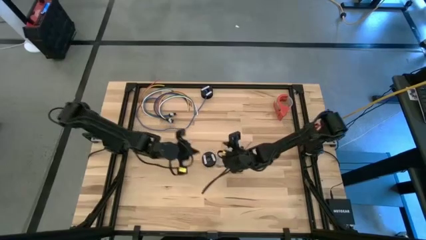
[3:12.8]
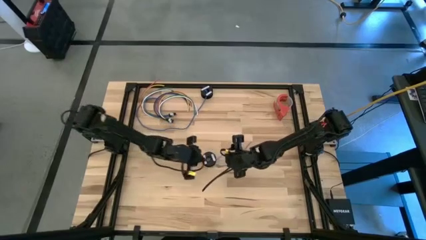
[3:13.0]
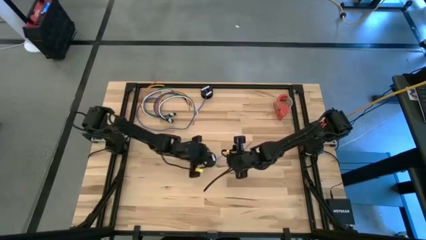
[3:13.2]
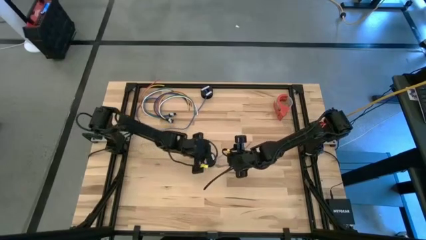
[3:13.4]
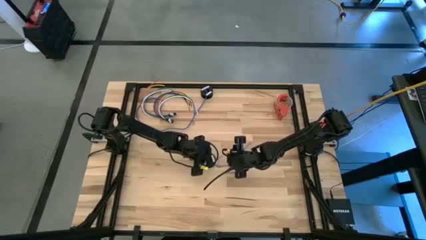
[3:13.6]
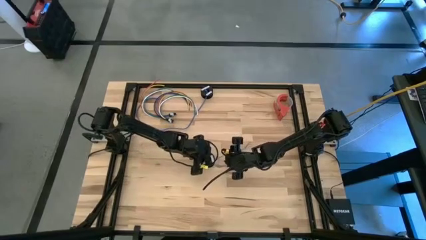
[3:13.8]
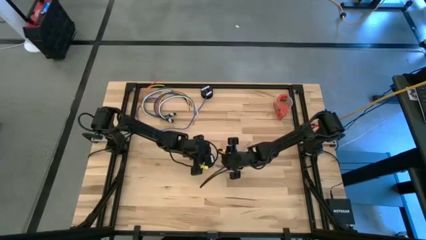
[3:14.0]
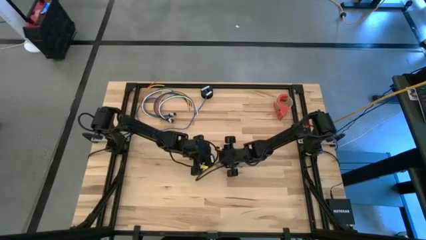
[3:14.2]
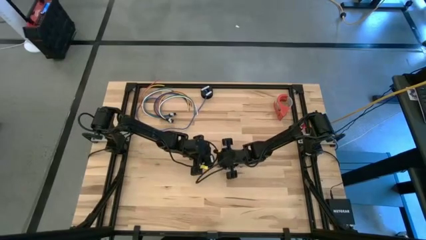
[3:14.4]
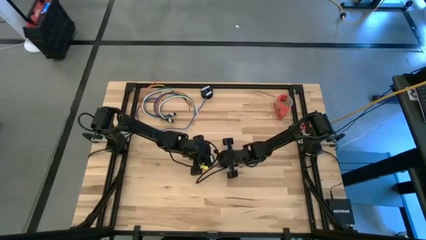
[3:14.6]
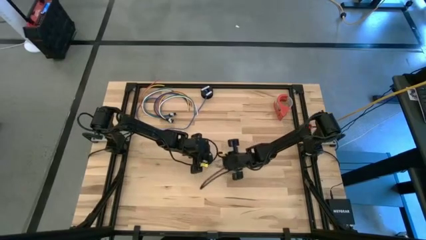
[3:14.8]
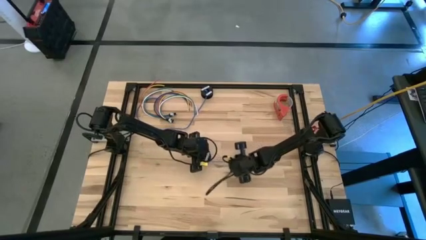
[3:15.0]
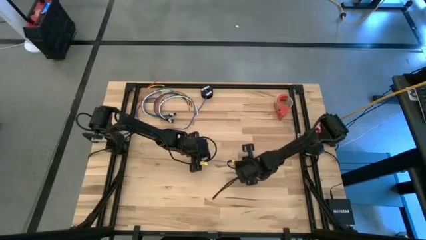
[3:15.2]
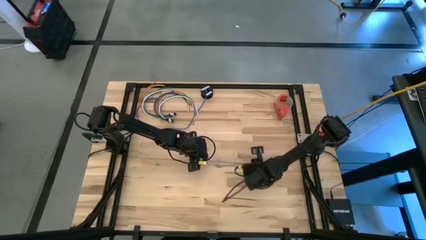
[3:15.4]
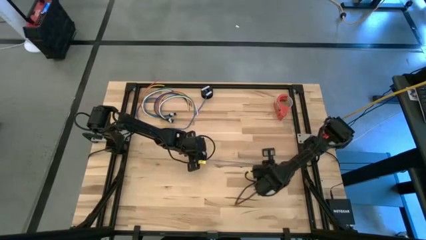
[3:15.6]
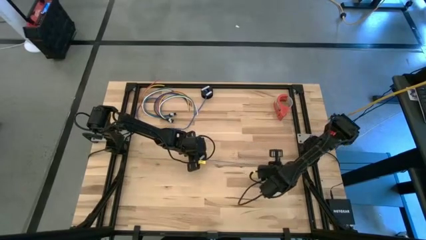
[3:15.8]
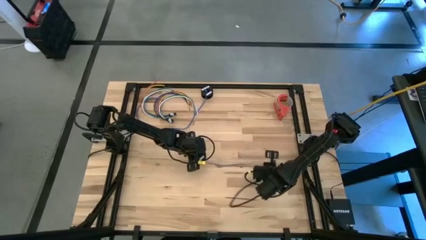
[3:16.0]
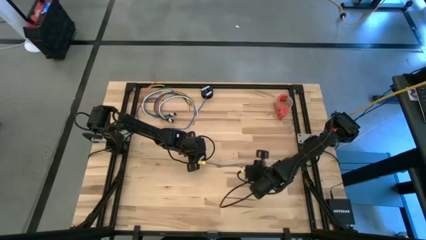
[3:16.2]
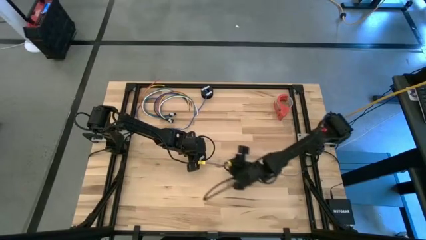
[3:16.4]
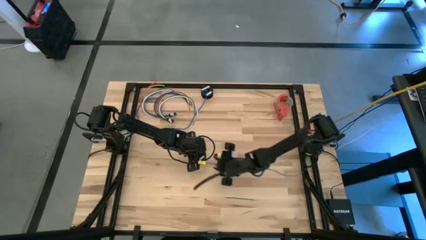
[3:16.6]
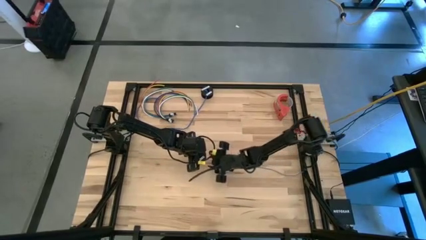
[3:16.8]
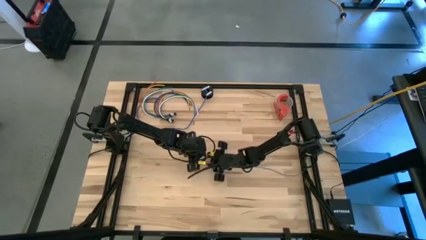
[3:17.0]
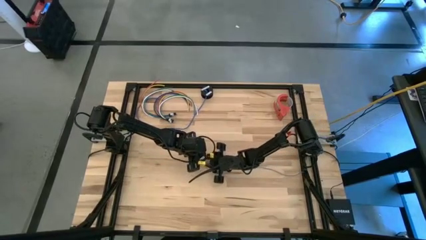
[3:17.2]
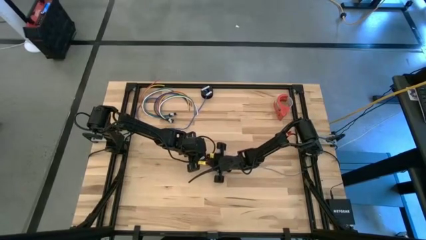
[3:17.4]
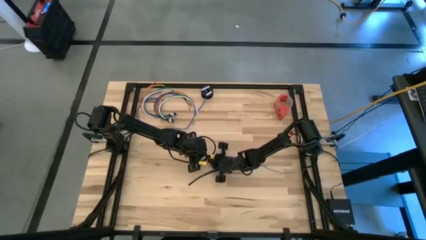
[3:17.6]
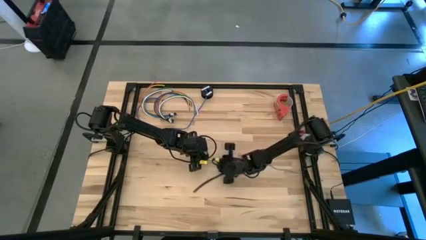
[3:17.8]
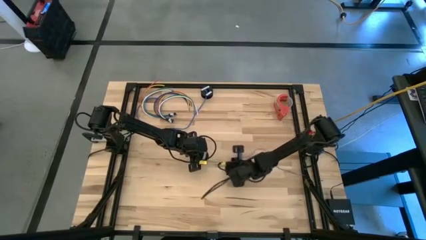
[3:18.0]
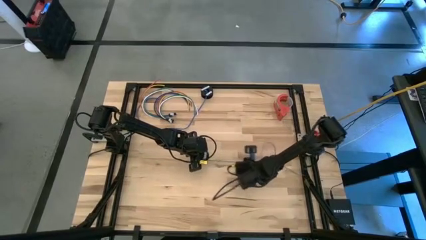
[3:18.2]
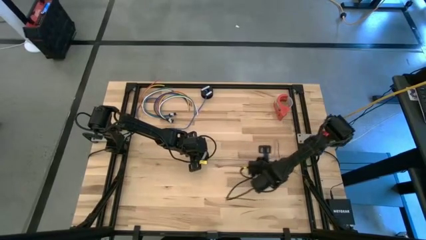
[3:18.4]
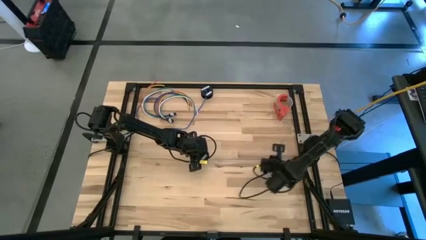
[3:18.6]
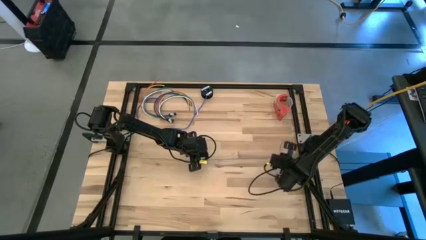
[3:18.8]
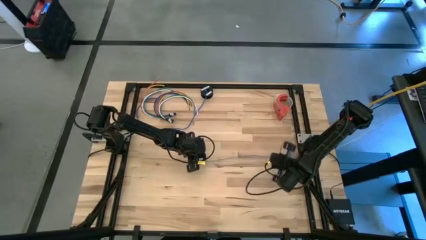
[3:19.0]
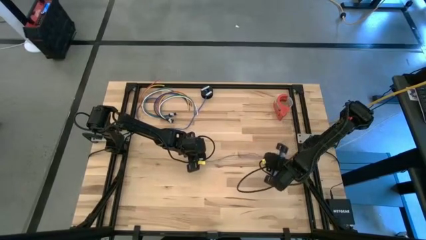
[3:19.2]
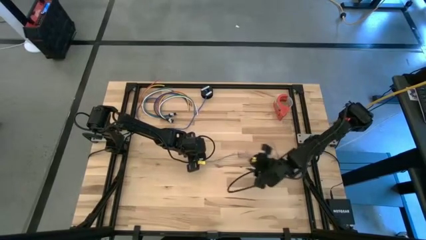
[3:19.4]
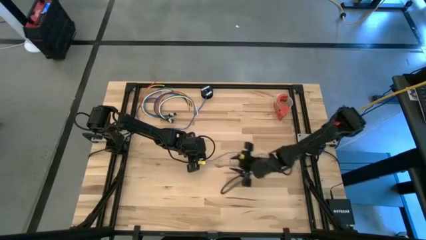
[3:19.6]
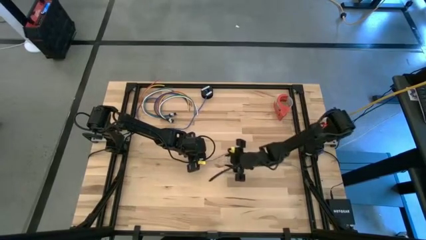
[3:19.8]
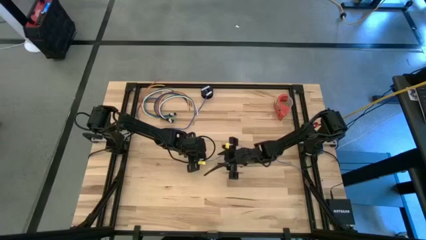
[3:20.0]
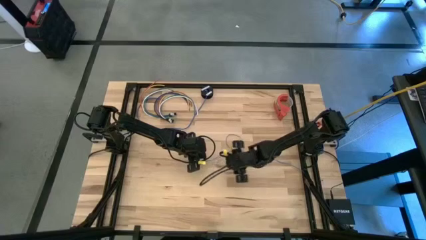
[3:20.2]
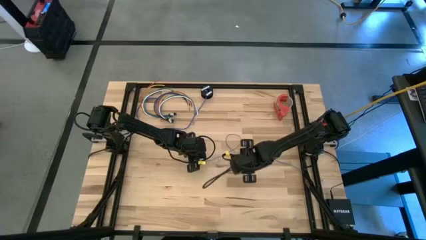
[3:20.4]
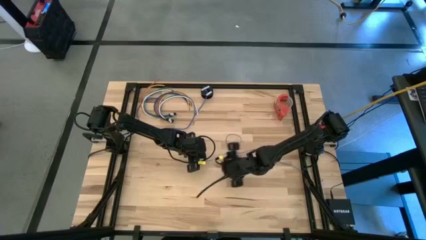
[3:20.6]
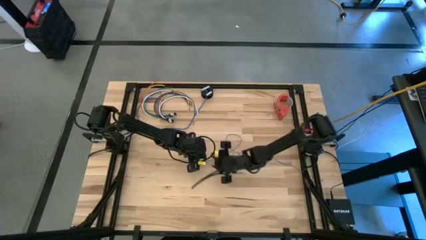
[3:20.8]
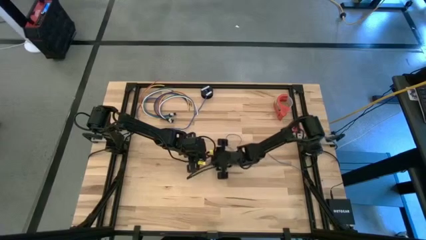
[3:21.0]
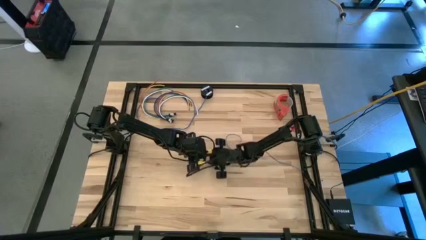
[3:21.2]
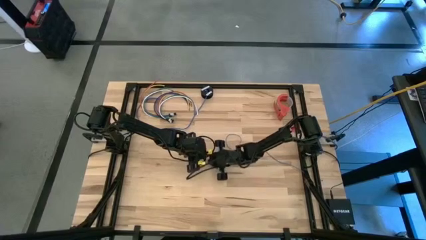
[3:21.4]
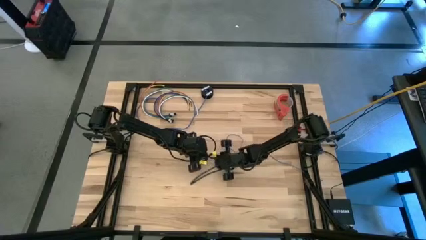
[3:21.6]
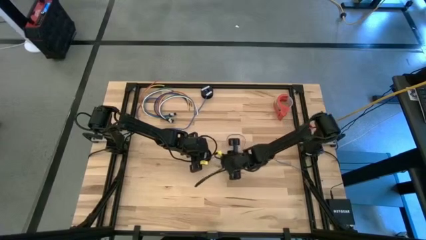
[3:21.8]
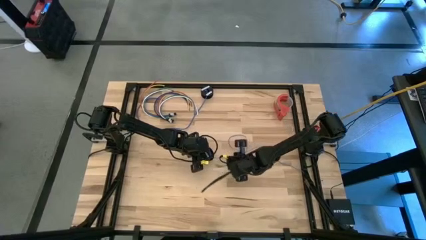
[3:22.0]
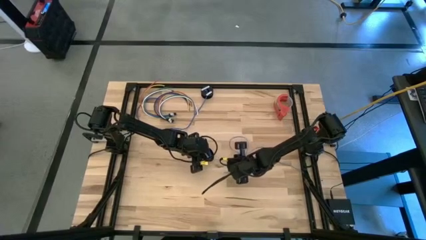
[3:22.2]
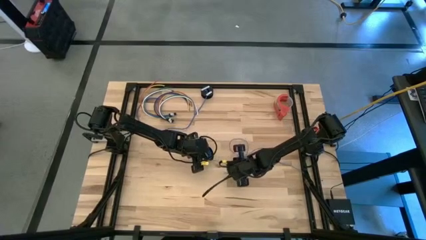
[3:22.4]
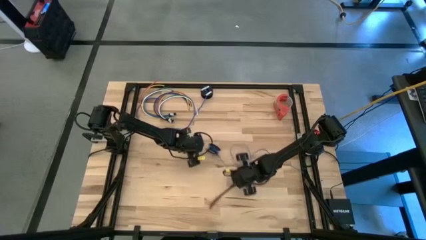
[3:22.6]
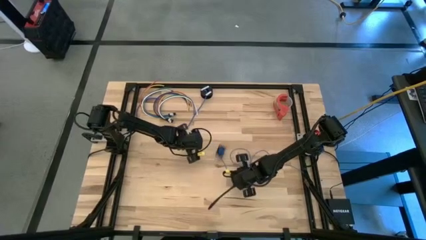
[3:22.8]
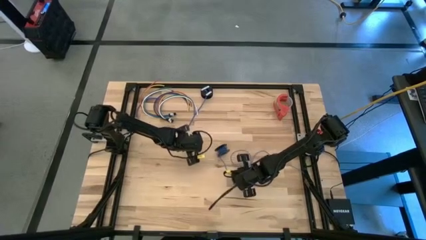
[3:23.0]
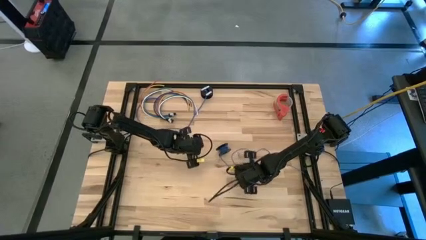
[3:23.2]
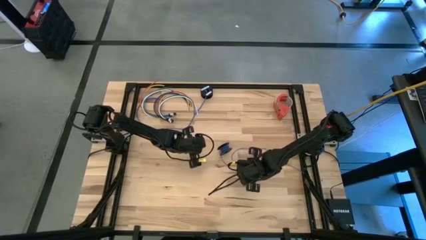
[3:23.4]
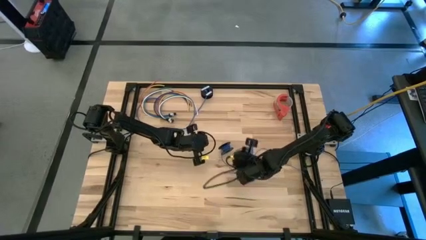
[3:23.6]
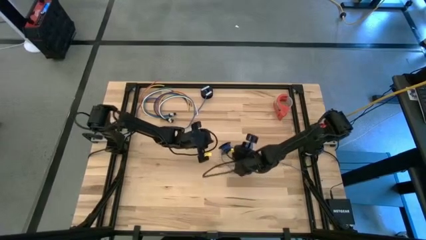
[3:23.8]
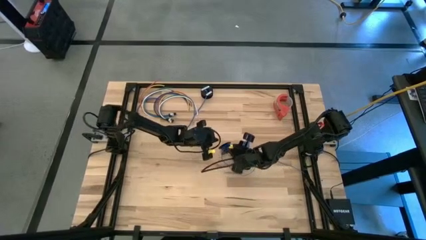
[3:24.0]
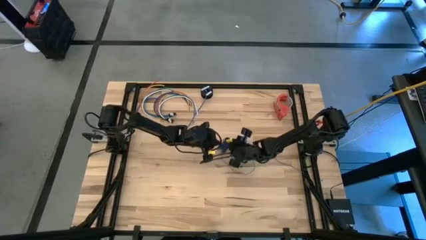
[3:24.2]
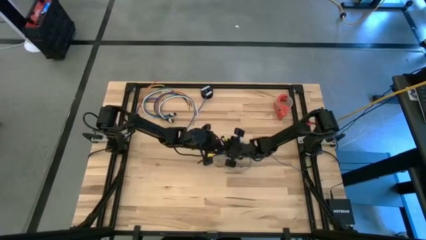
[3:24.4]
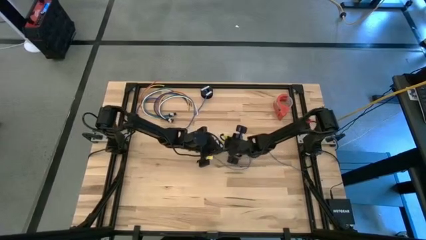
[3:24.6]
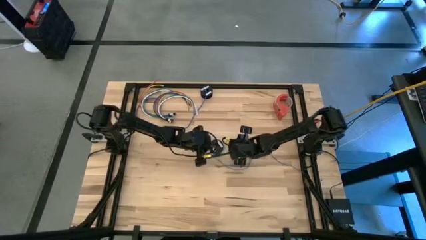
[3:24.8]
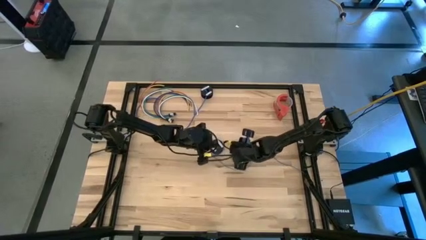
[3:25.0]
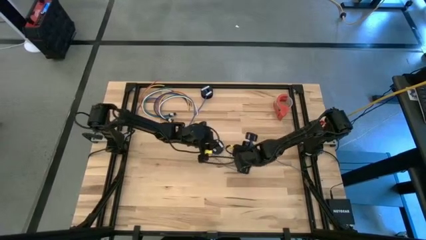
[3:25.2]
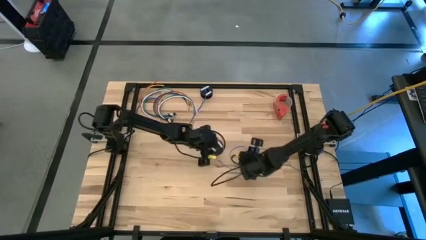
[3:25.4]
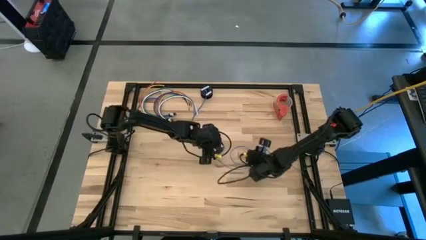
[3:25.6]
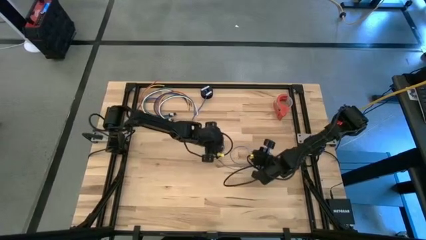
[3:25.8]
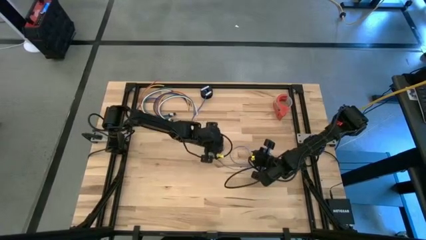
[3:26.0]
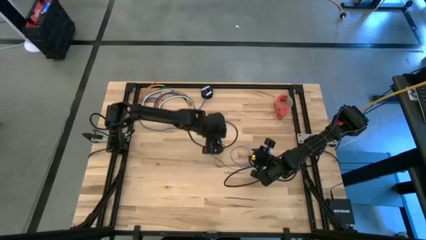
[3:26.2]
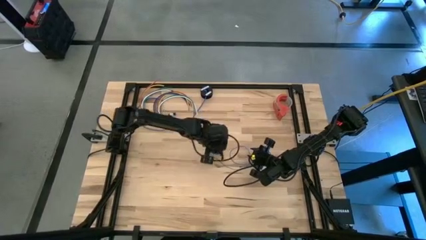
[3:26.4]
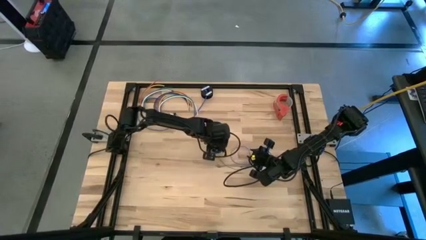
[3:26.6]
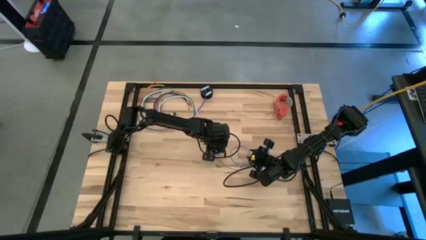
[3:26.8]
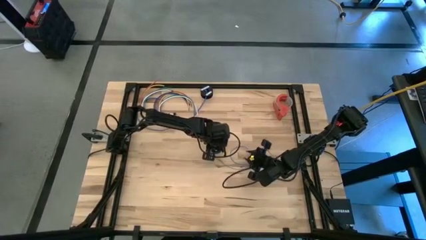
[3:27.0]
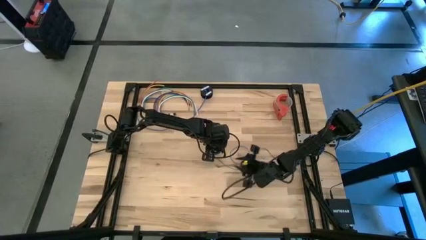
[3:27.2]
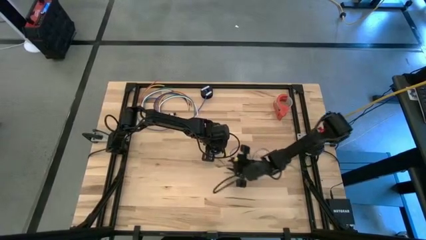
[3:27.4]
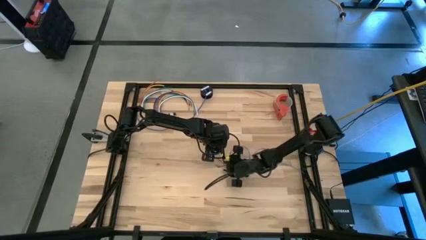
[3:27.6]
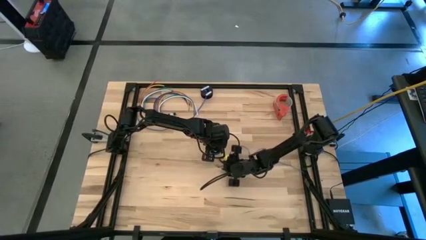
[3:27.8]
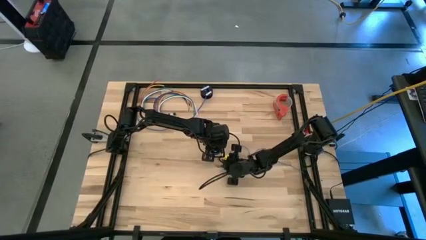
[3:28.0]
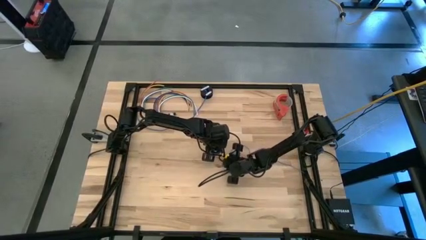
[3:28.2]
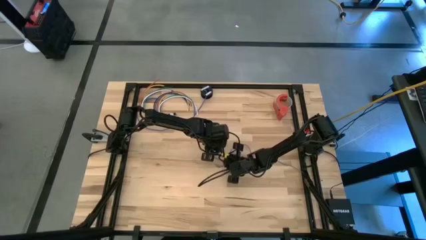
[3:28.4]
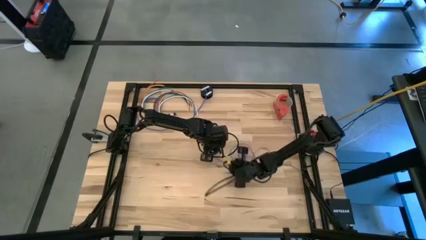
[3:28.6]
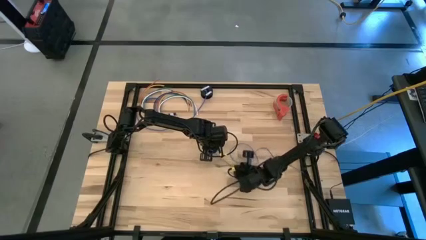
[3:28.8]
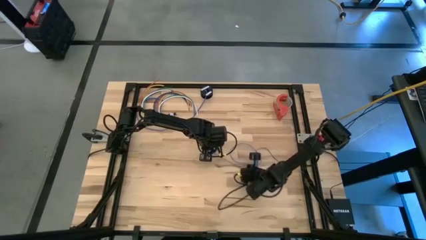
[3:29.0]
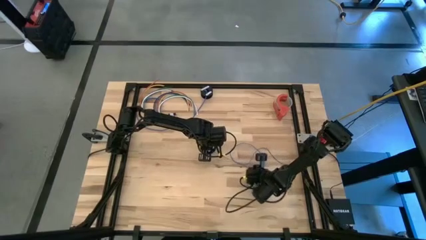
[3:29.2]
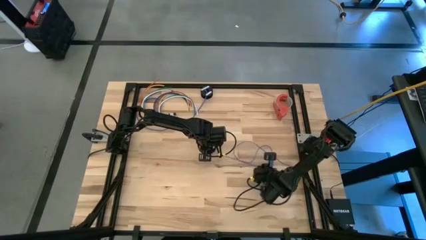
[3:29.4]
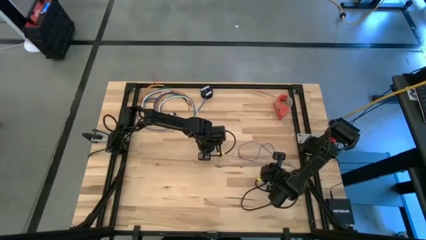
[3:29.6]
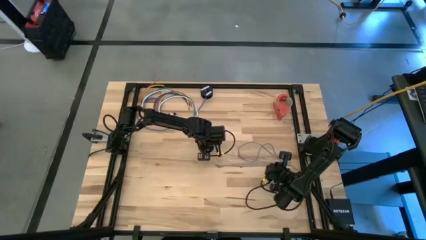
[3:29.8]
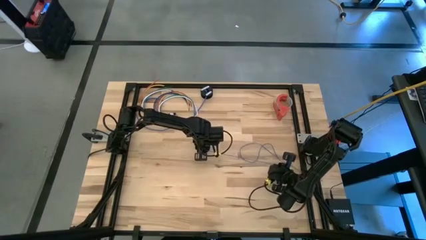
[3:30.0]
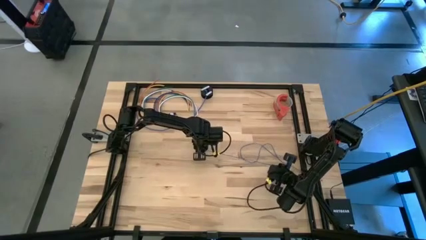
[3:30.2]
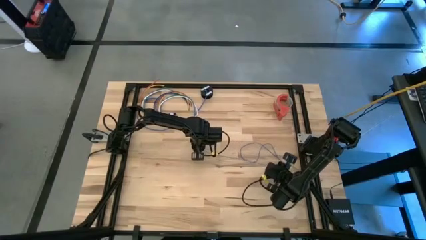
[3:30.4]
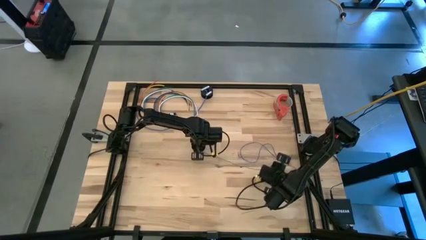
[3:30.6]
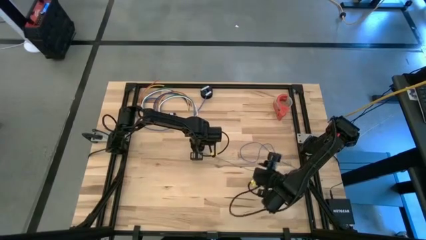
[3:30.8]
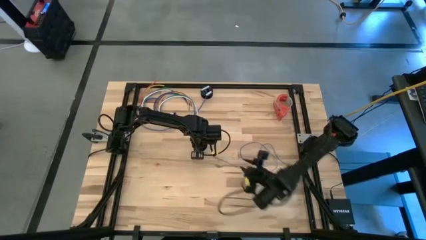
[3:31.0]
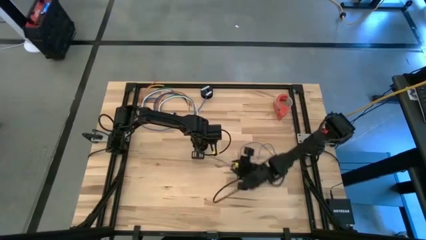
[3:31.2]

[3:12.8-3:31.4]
Task: Coil cords
Put the spool with the coiled wire on the table
